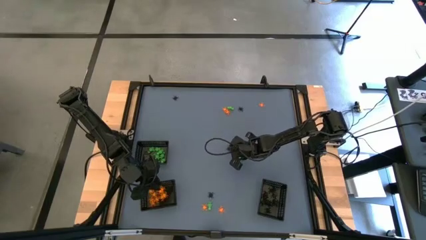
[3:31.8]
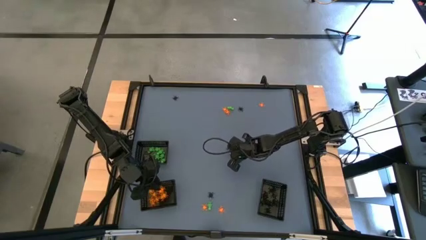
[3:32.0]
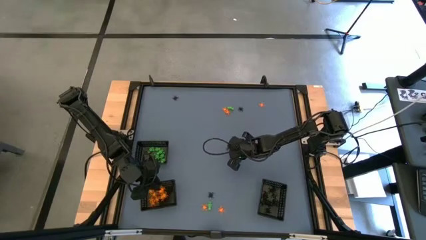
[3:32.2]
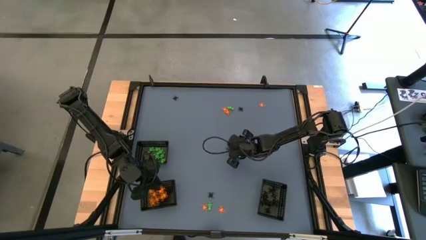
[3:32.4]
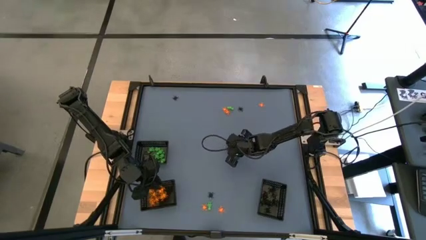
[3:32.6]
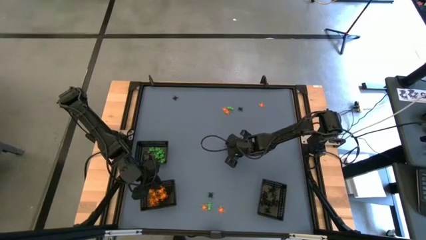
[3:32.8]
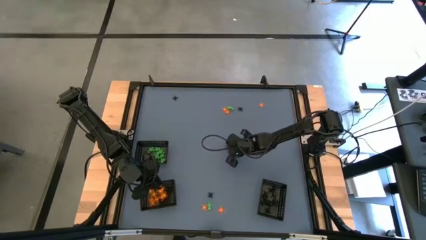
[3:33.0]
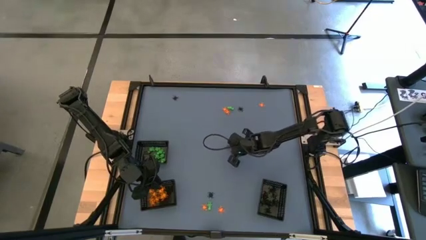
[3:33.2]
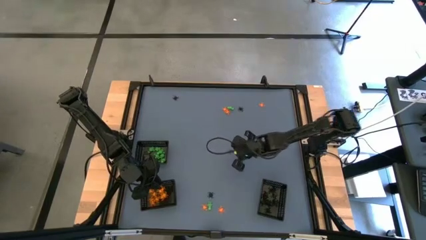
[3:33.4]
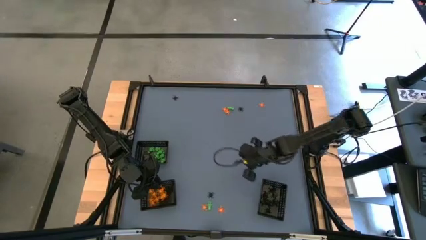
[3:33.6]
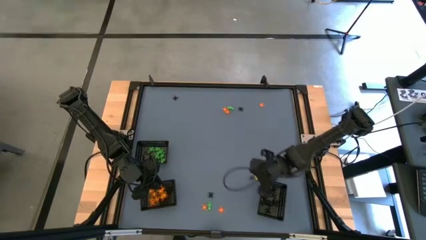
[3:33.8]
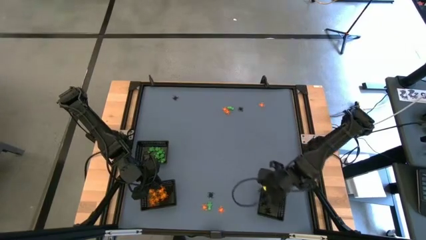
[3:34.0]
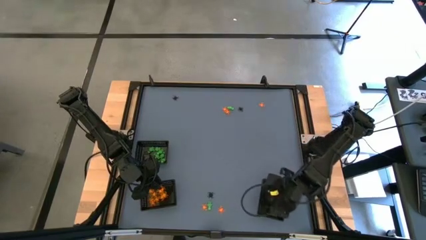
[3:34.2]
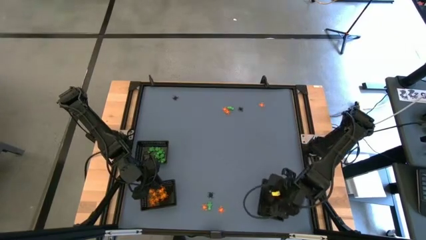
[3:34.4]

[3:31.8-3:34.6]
Task: Sort Halloween decoration
Put the black spider toy into the bottom right black bin

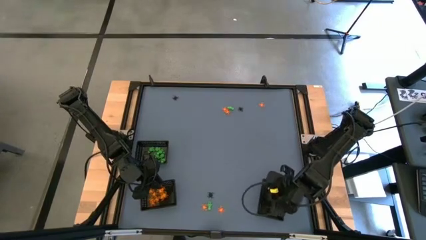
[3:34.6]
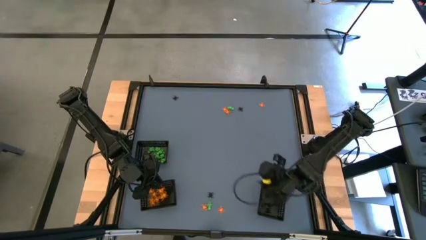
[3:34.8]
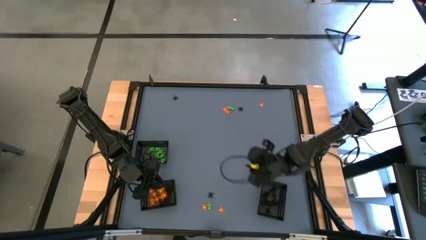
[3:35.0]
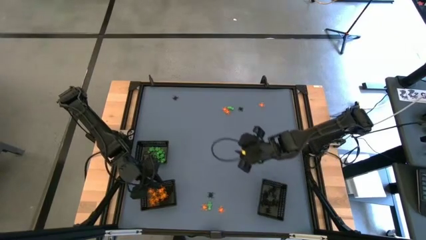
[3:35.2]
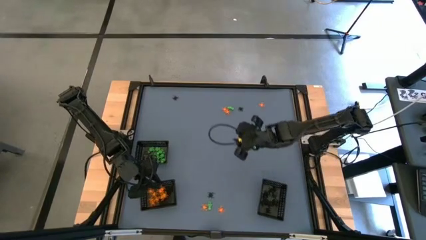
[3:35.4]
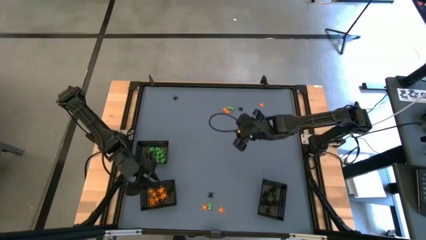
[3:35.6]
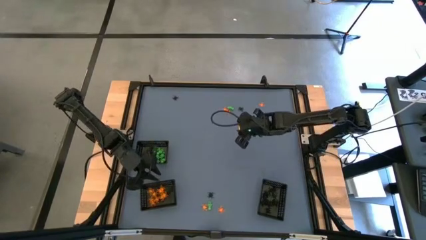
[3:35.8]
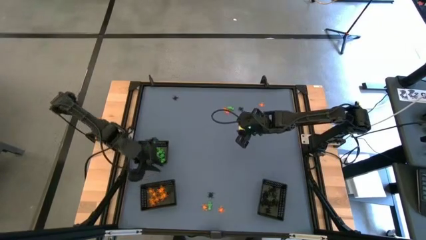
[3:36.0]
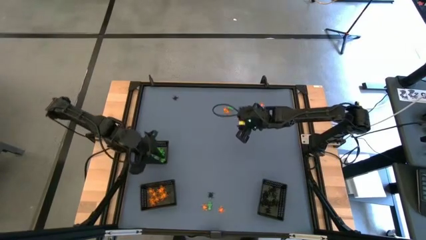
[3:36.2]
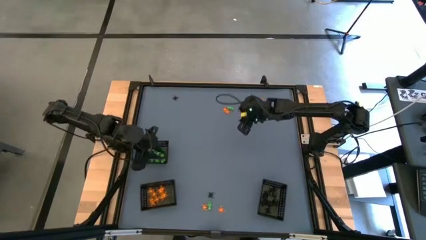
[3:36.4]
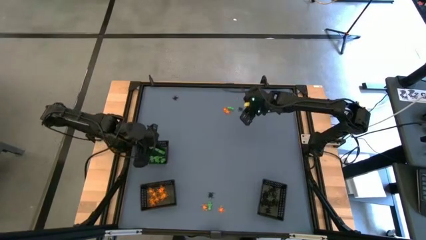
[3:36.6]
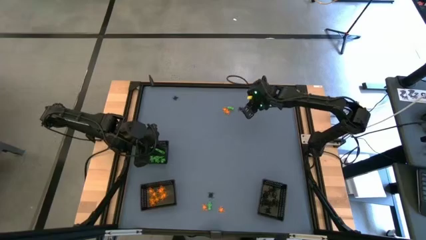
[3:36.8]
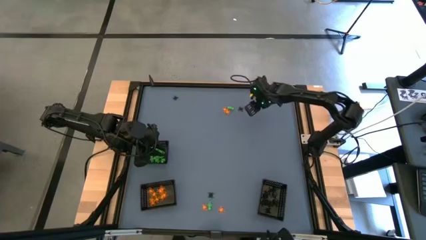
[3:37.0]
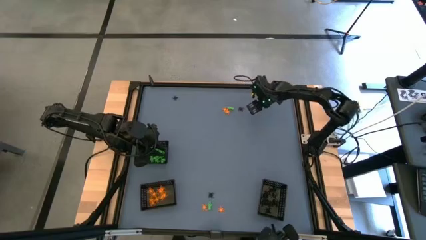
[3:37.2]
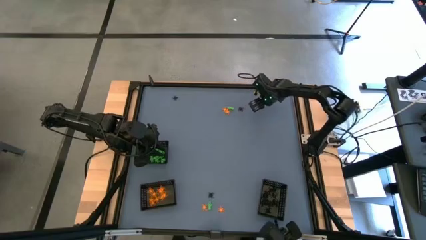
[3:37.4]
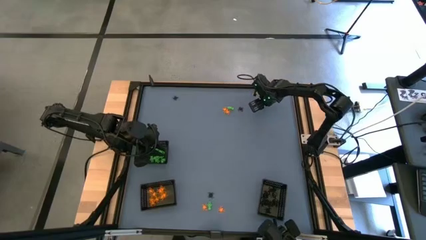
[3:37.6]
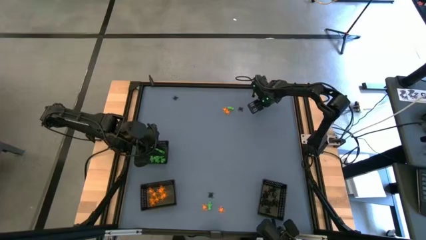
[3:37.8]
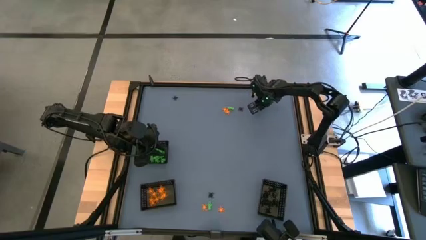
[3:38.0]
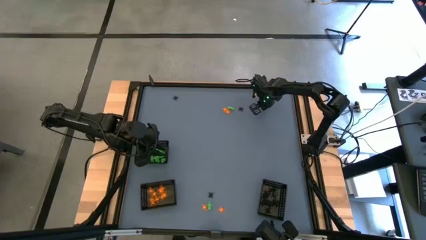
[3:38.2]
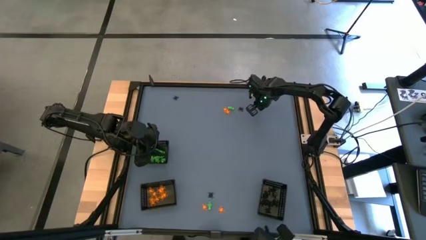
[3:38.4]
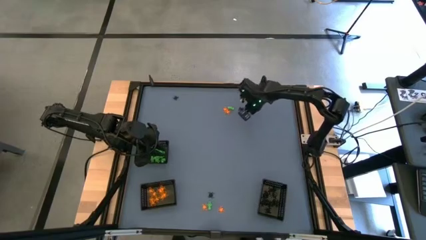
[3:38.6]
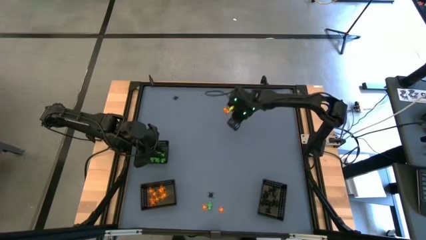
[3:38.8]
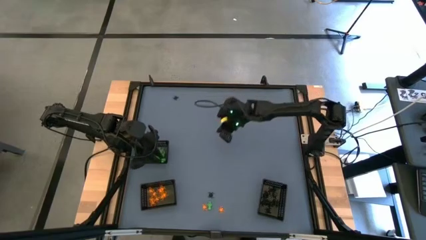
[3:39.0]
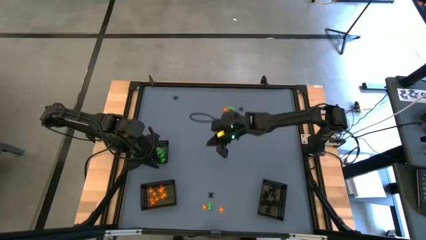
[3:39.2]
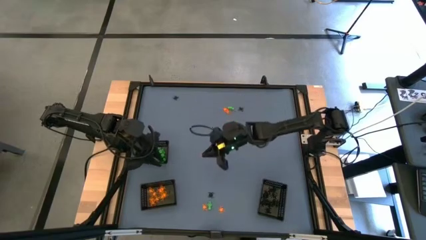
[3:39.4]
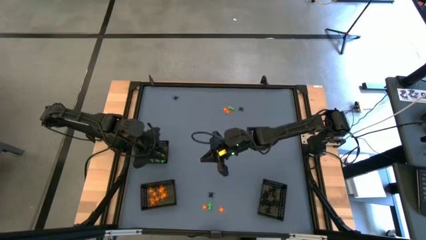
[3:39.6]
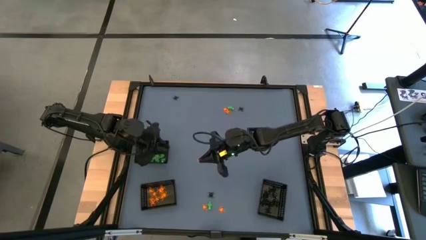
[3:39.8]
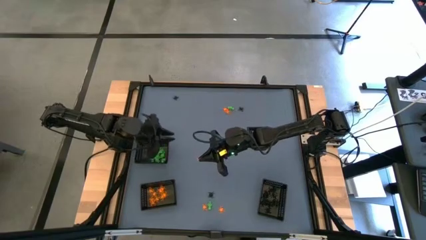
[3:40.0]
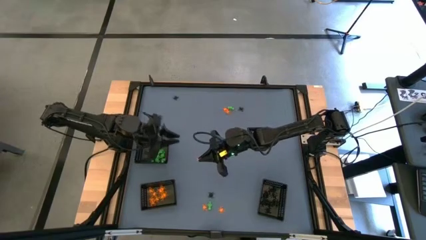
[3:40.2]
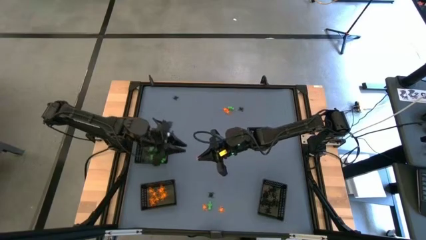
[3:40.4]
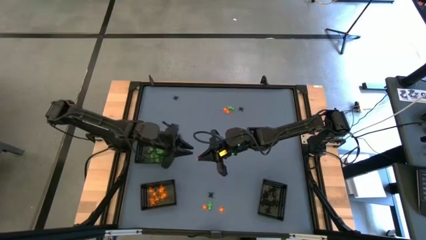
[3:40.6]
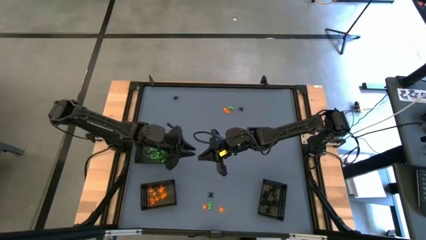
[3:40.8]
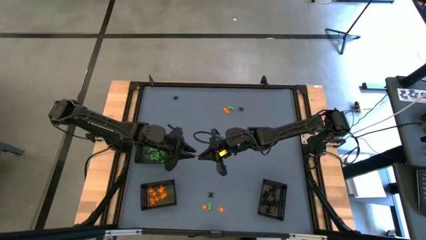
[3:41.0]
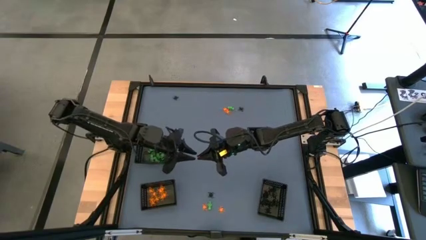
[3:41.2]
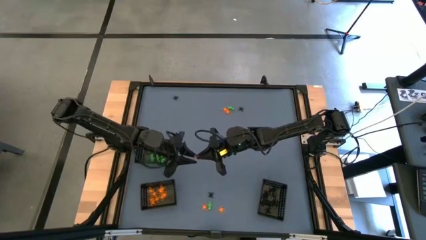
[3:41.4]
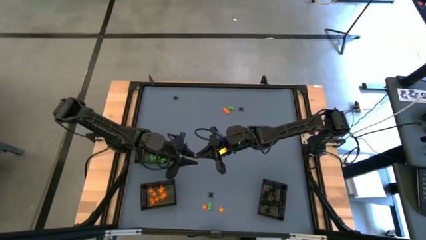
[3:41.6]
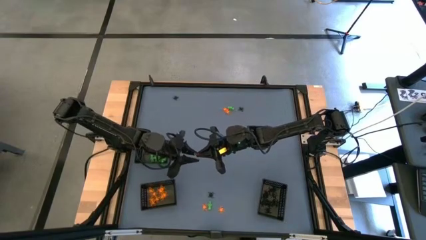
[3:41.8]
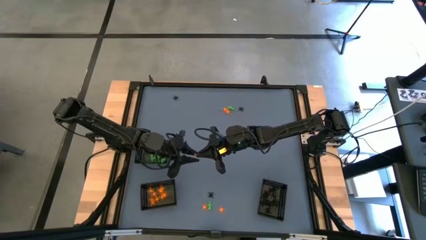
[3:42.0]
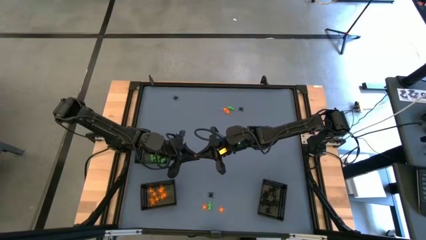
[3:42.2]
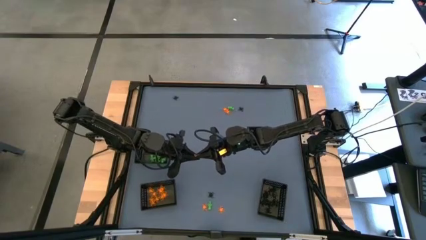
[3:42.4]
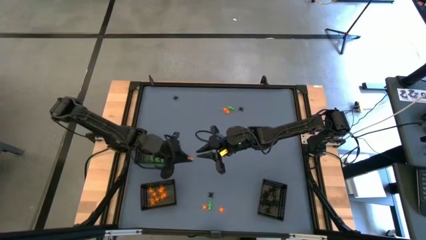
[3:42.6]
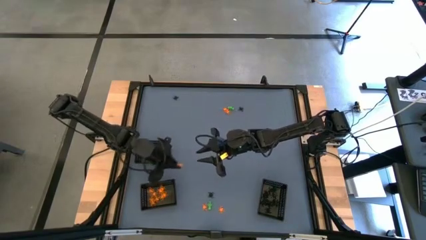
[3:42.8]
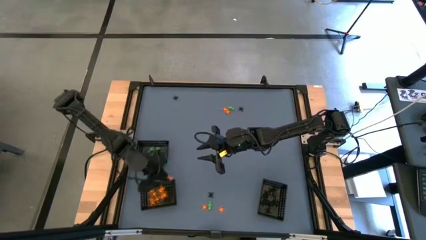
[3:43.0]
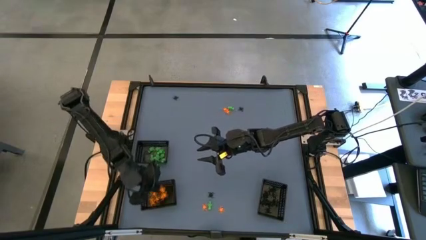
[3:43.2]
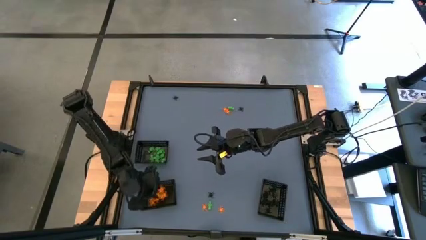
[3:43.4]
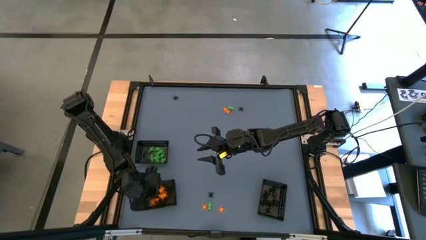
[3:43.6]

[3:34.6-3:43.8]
Put the orange spider toy into the bottom left black bin

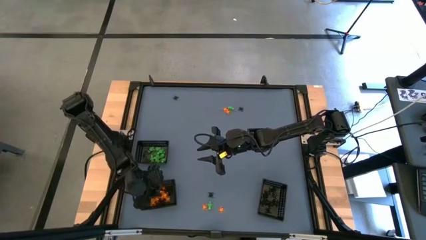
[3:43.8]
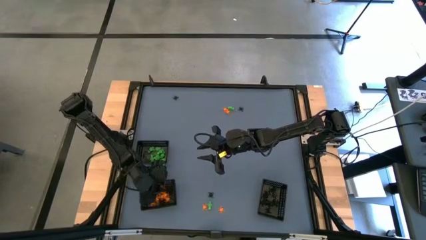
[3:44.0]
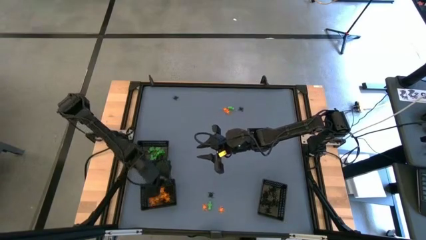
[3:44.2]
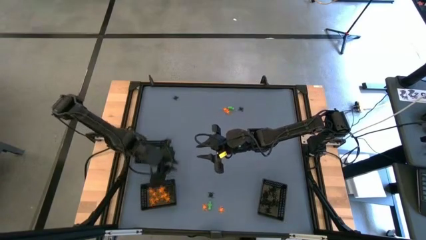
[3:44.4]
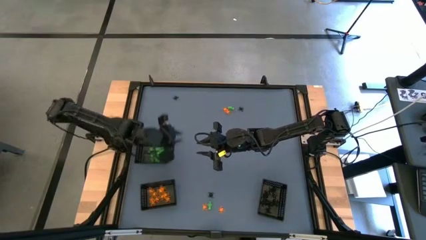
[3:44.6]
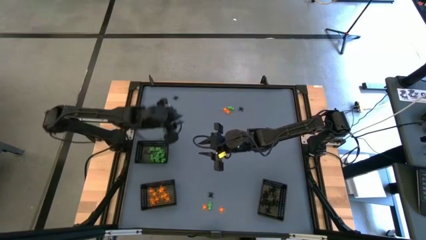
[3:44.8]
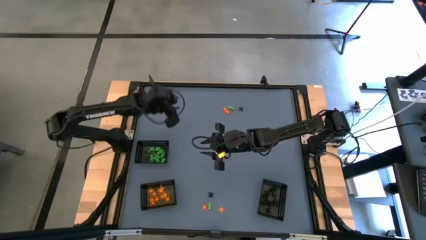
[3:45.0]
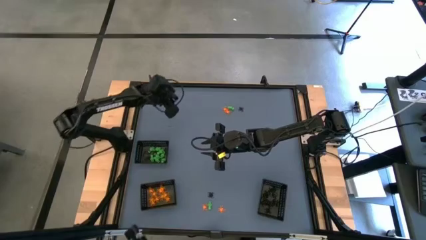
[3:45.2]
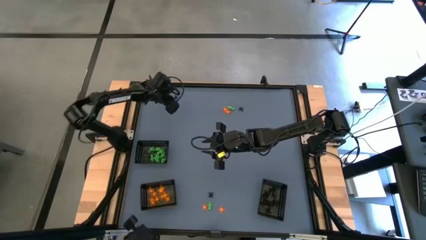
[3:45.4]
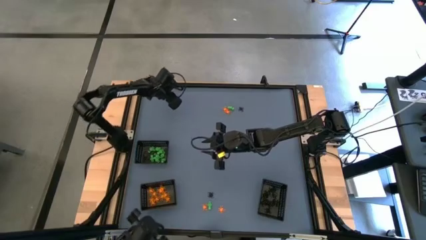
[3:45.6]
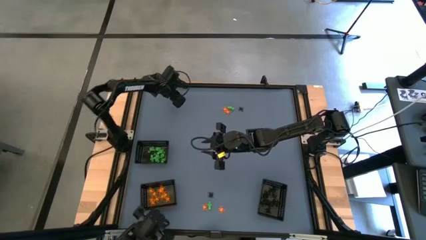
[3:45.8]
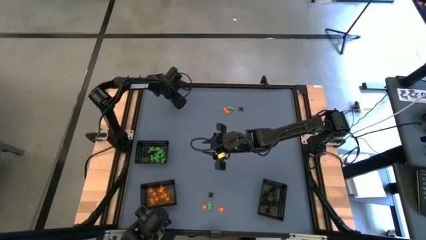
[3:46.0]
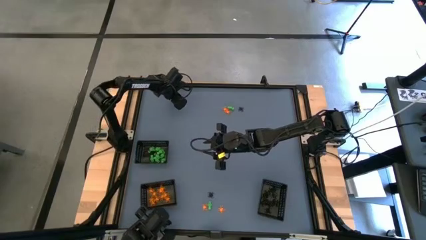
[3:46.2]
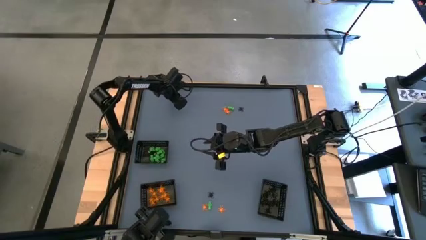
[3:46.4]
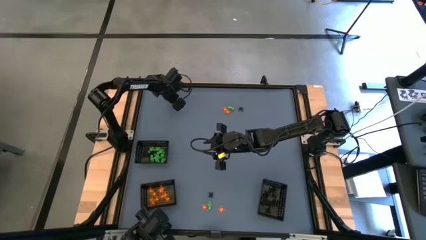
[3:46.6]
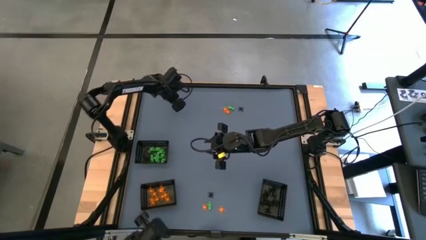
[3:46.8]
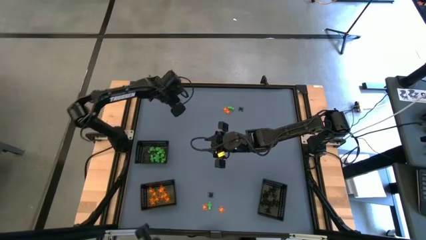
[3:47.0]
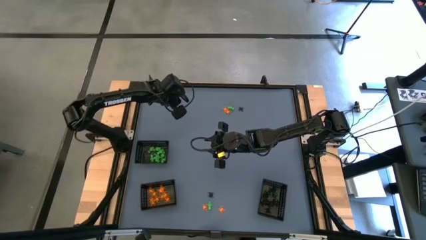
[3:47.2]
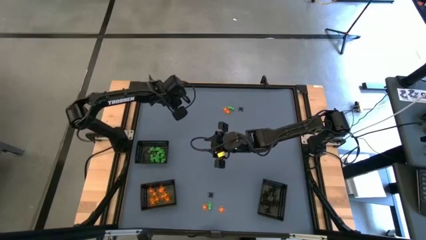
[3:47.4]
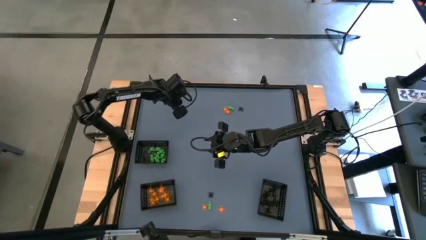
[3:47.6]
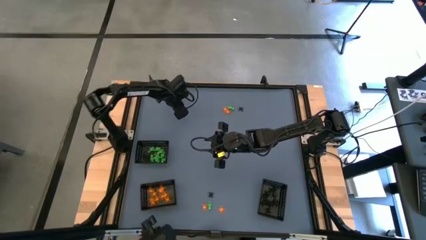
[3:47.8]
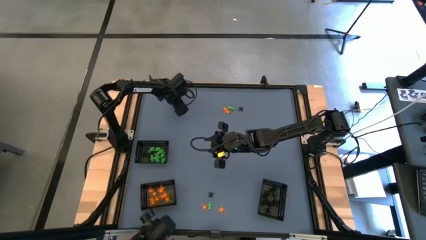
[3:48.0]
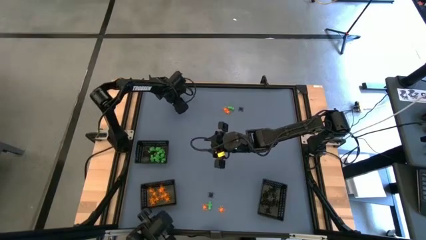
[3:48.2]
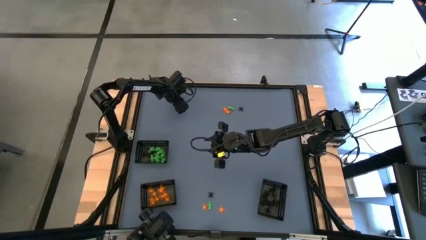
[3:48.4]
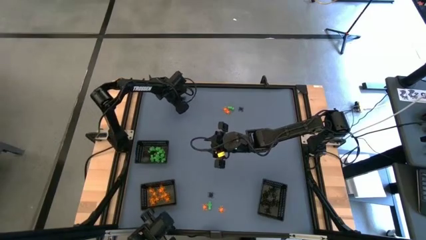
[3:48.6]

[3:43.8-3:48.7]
Put the black spider toy into the bottom right black bin
